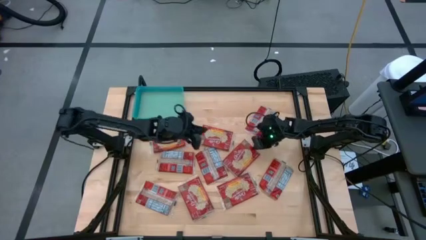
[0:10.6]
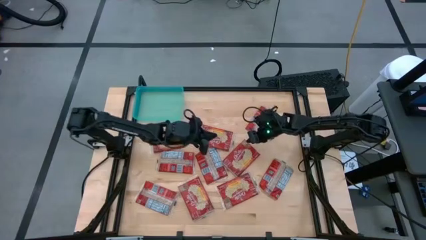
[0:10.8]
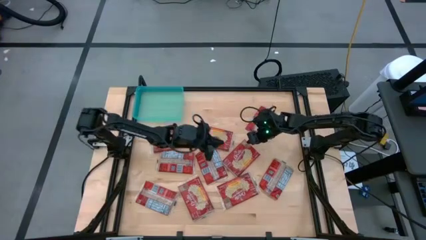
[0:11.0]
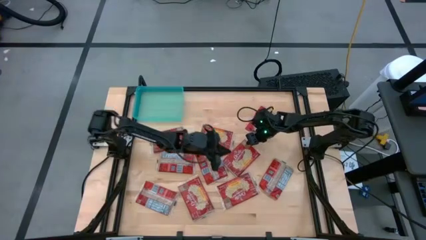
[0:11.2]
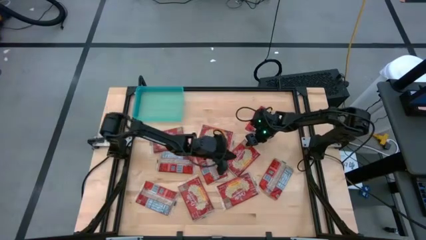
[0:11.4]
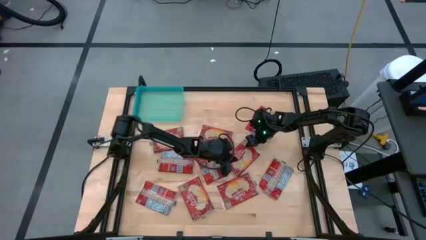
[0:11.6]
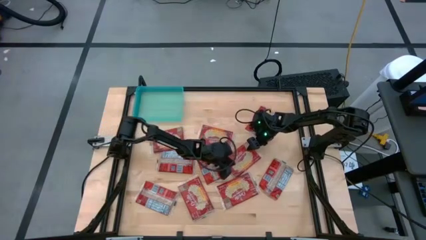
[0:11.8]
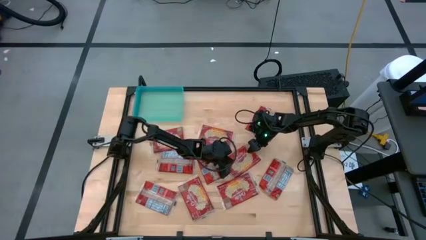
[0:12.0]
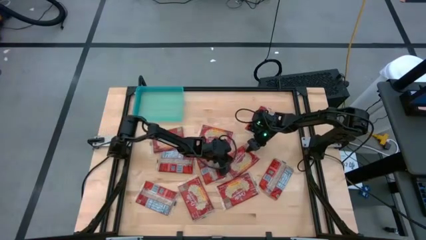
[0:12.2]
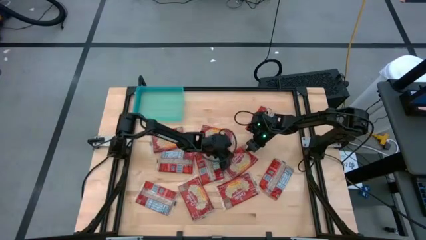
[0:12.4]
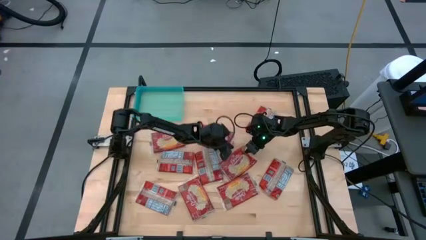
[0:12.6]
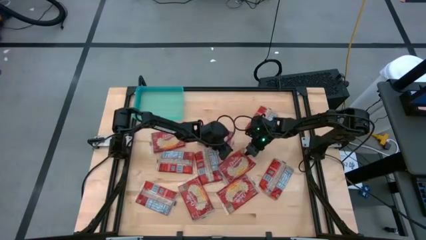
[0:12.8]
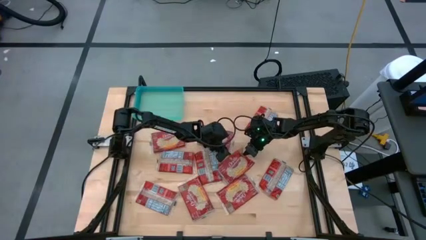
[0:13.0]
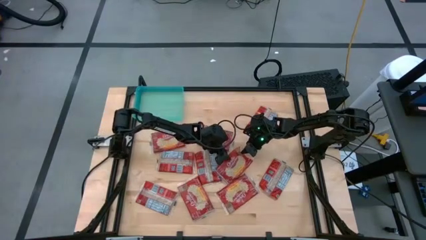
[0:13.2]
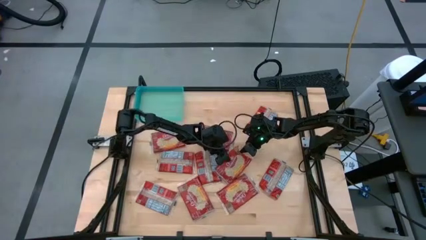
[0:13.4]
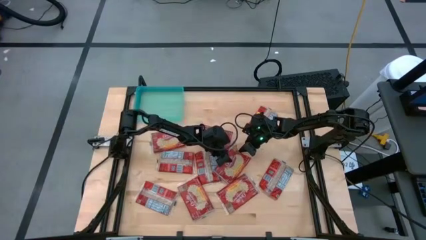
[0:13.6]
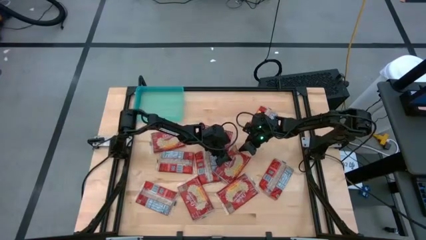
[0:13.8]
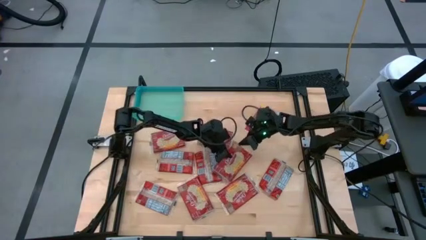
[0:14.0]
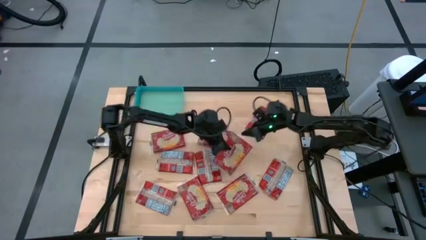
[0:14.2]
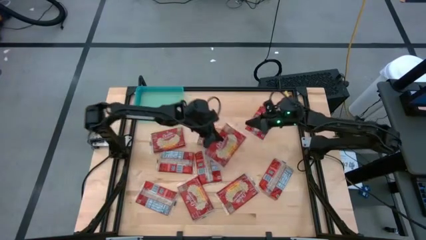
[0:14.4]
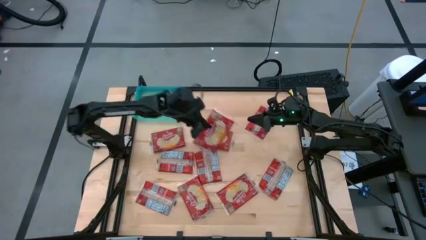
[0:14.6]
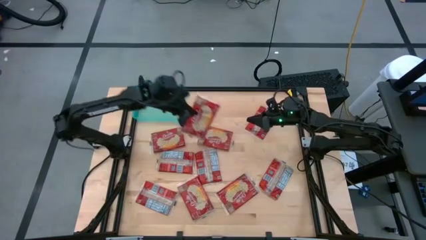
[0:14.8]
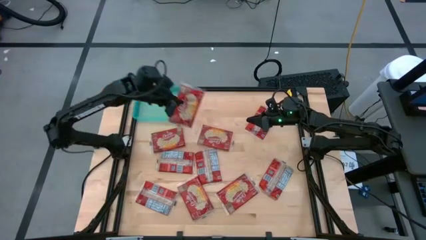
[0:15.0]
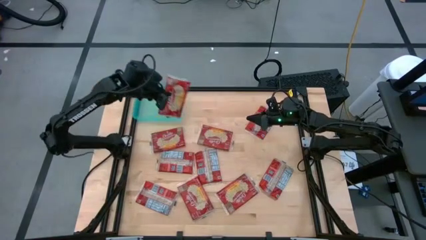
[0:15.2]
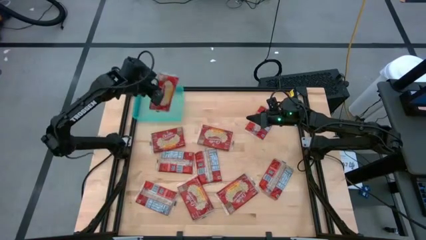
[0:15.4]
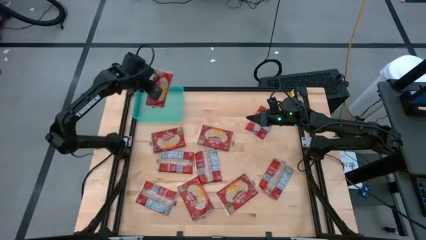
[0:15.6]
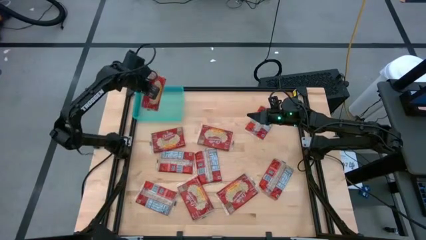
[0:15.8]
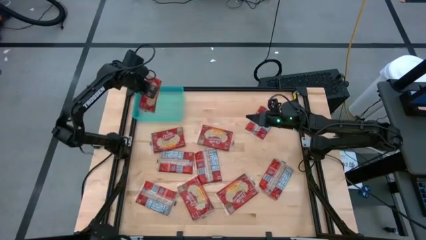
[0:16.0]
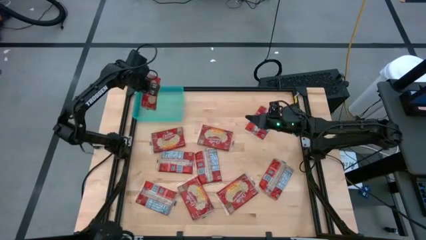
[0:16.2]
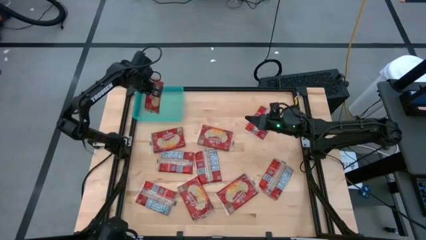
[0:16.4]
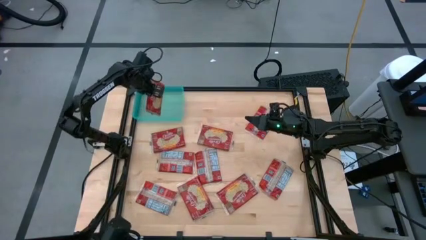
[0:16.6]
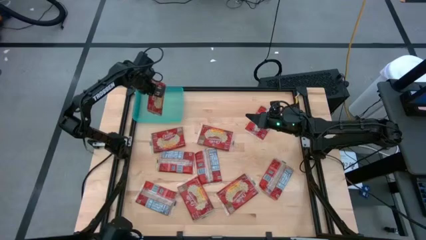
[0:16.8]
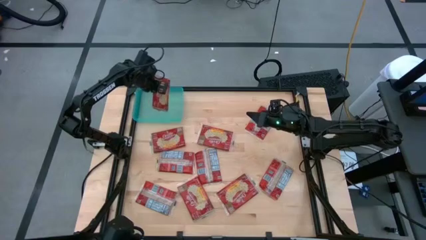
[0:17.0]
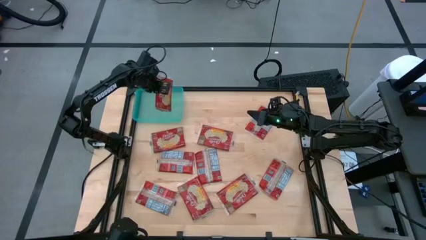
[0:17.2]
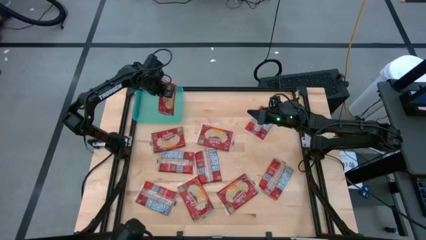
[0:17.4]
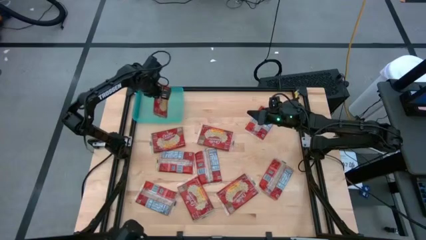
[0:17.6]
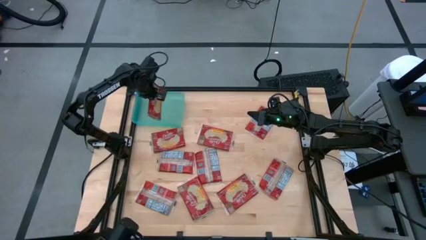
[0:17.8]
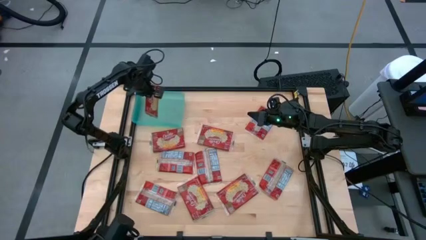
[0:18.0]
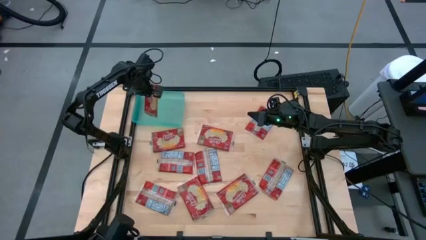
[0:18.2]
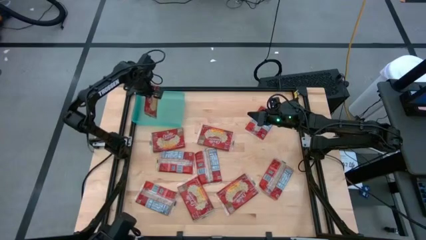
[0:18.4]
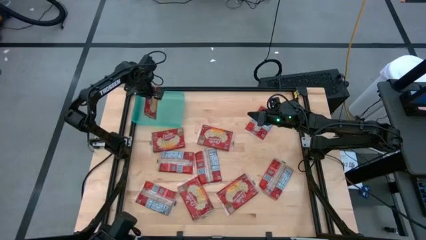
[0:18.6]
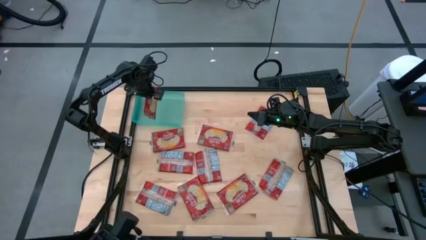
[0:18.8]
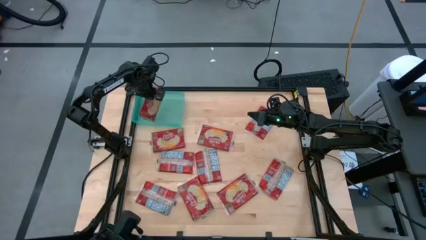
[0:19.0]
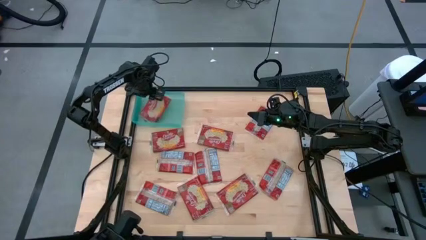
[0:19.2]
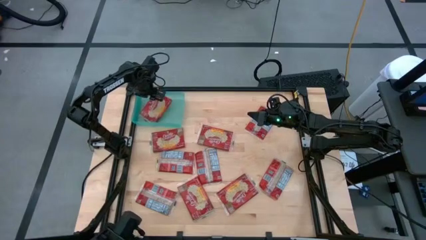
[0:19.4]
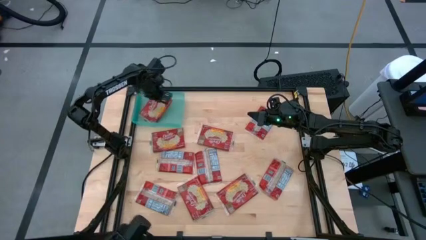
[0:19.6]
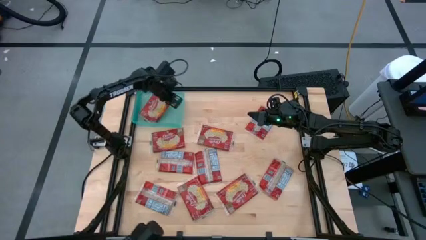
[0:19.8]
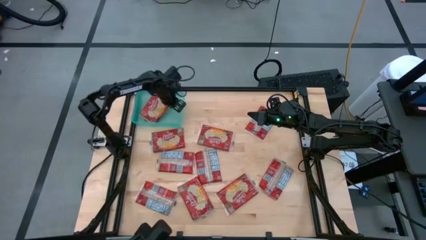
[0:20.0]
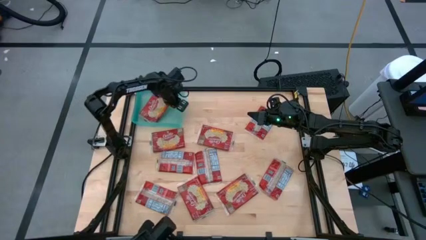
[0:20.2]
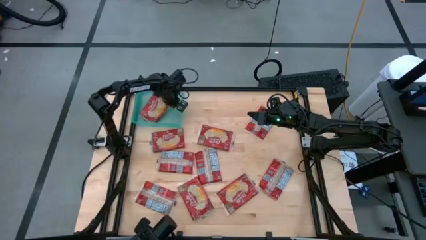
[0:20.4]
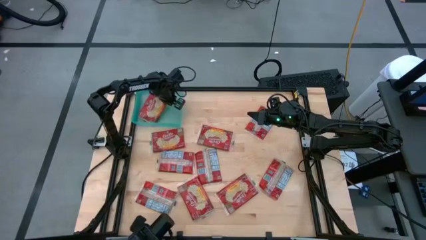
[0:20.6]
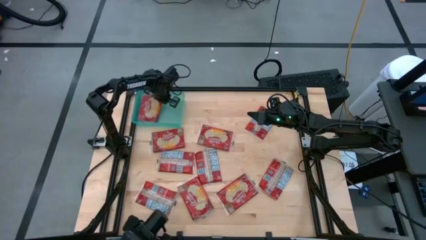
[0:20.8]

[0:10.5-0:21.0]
Task: Sort popcorn bags into baskets
Put the red popcorn bag into the blue bin

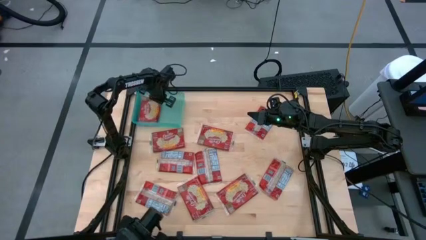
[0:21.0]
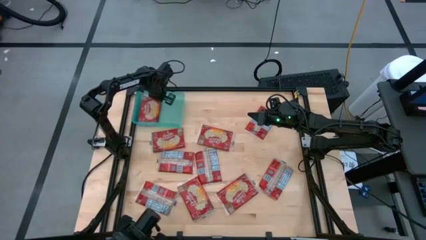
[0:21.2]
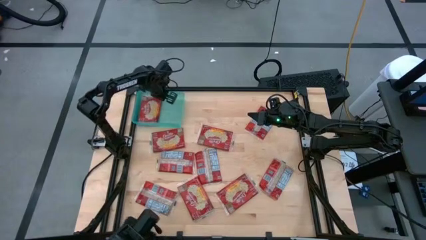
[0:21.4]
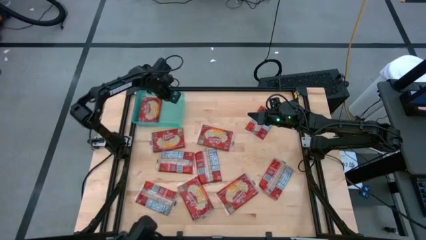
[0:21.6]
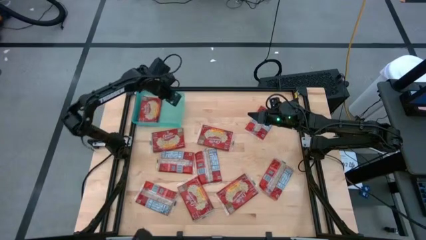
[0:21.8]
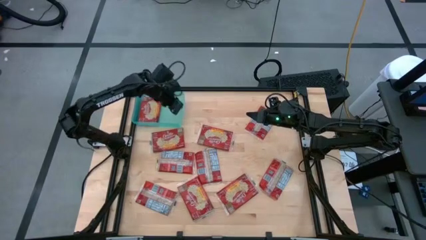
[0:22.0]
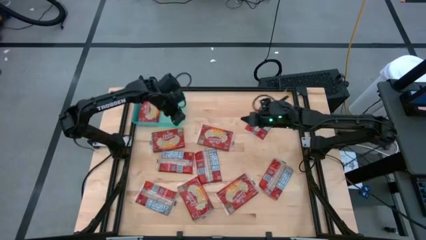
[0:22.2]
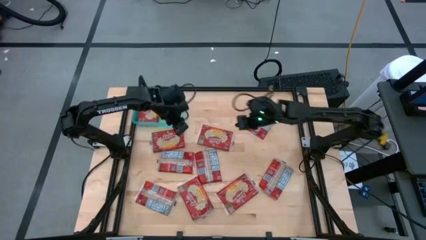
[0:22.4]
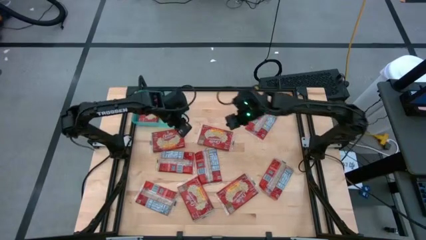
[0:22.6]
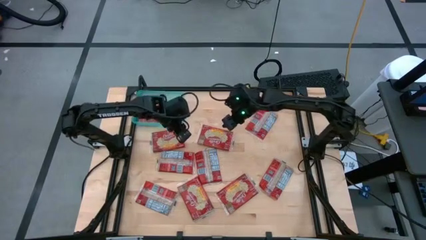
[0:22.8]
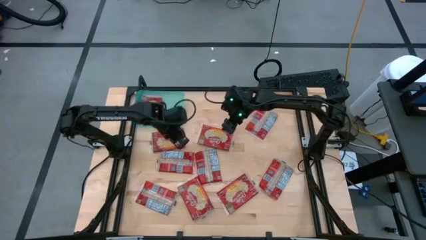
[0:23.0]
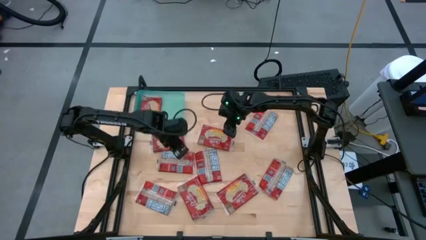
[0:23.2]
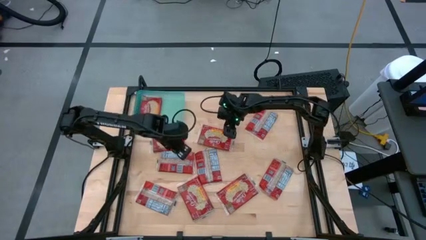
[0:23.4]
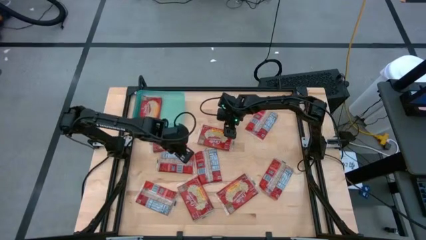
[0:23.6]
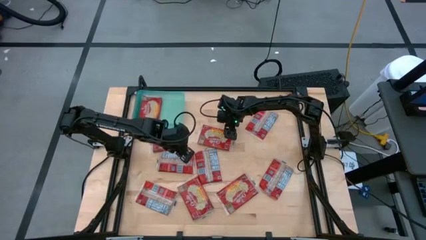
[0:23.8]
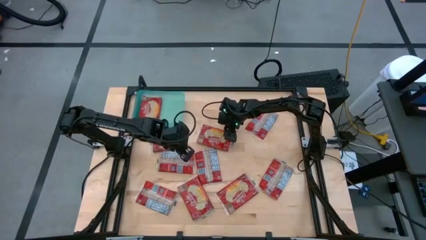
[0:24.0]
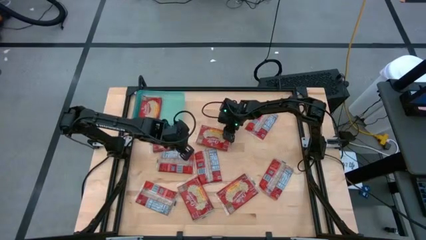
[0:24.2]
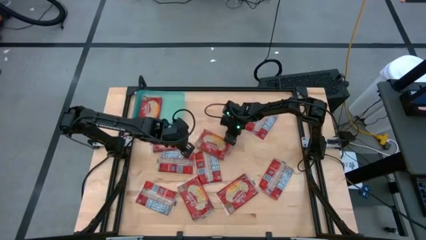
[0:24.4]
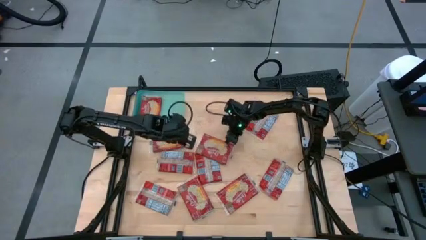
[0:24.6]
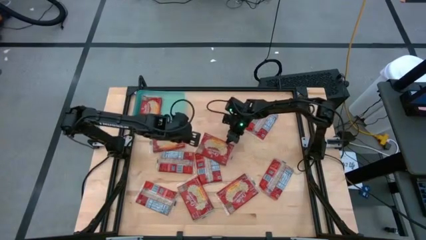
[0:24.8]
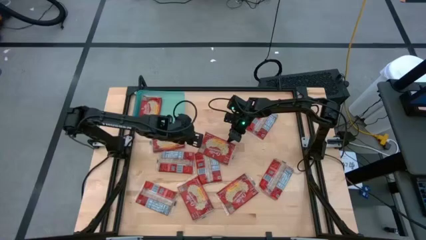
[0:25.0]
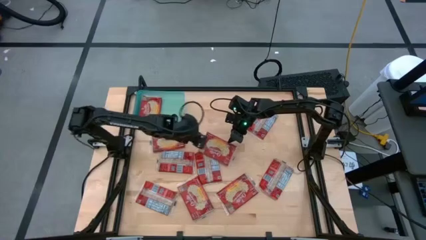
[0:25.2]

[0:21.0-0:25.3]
Put the red popcorn bag into the blue bin
